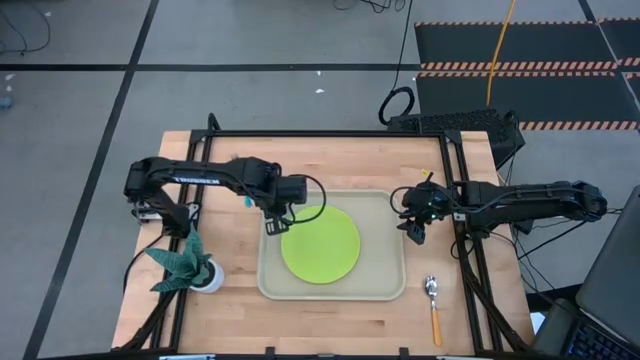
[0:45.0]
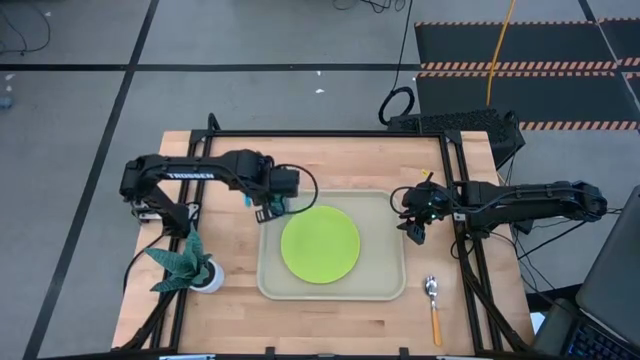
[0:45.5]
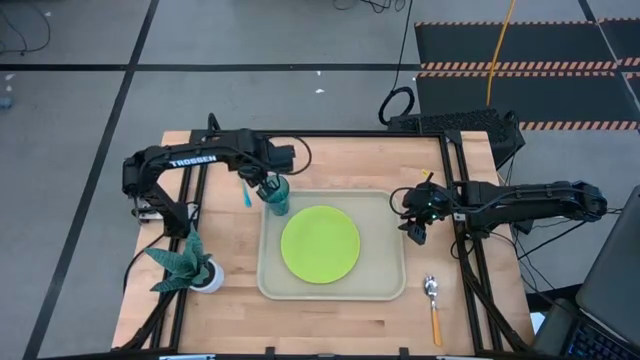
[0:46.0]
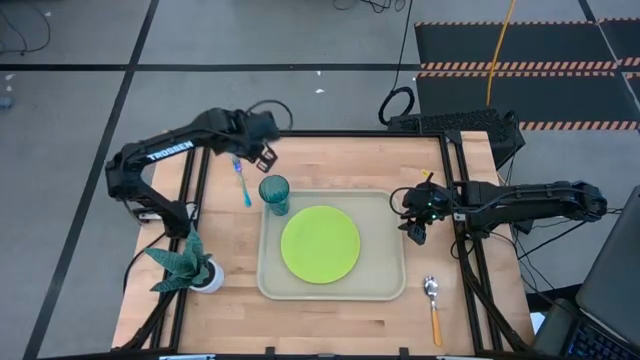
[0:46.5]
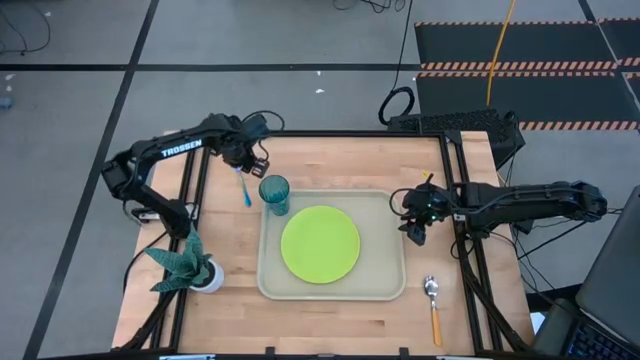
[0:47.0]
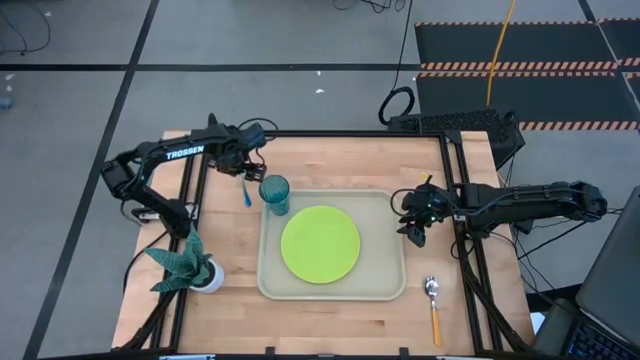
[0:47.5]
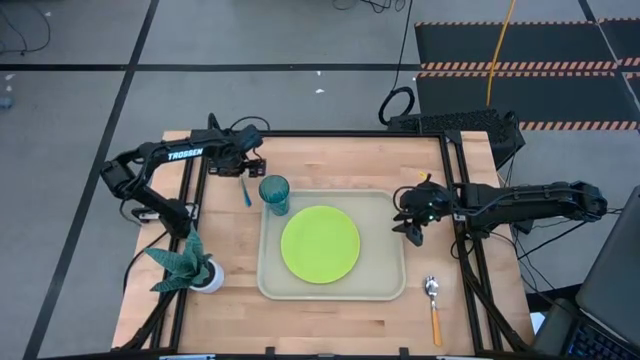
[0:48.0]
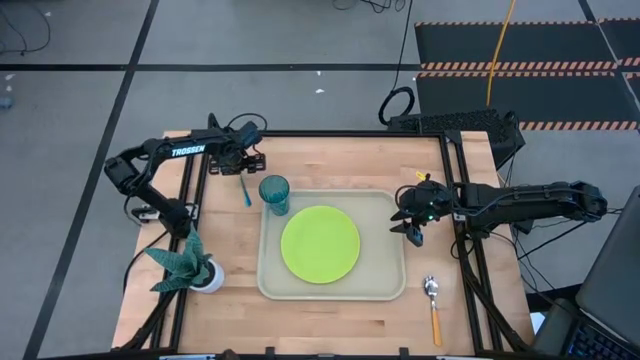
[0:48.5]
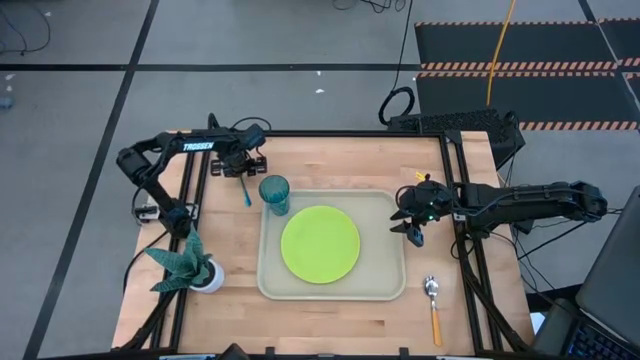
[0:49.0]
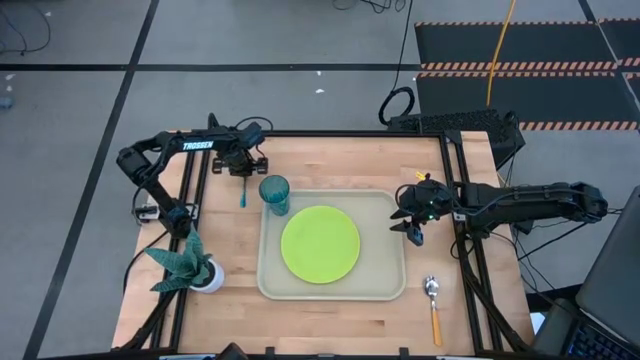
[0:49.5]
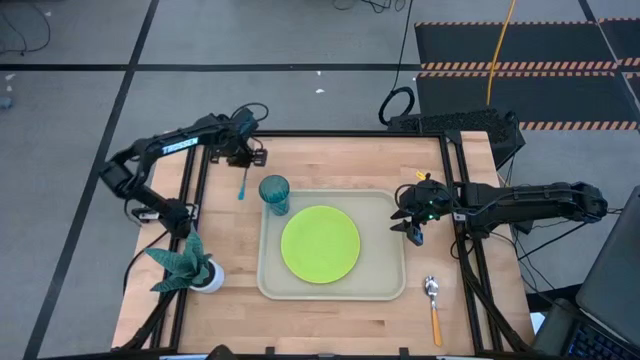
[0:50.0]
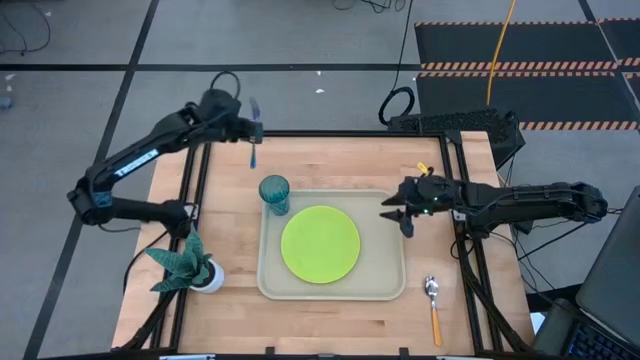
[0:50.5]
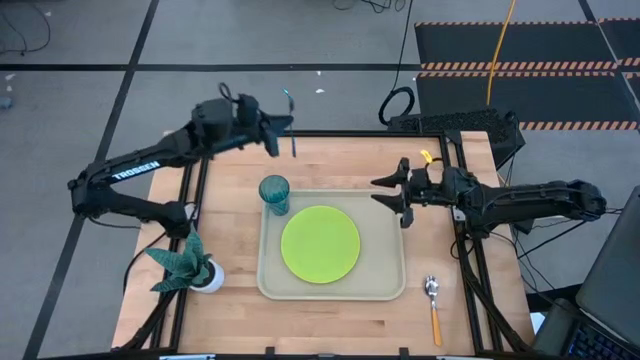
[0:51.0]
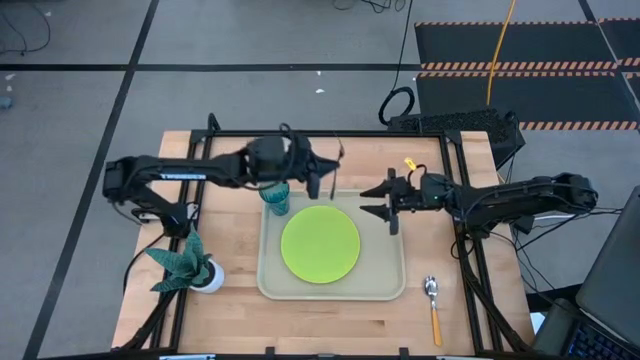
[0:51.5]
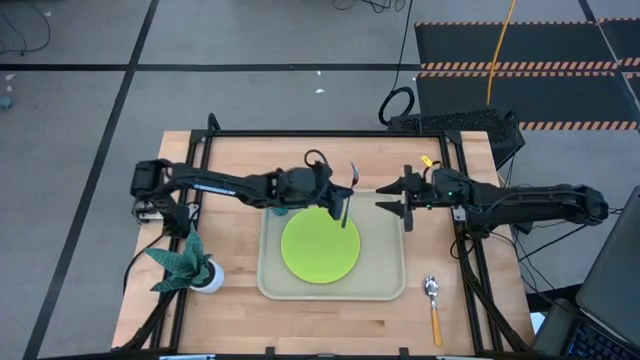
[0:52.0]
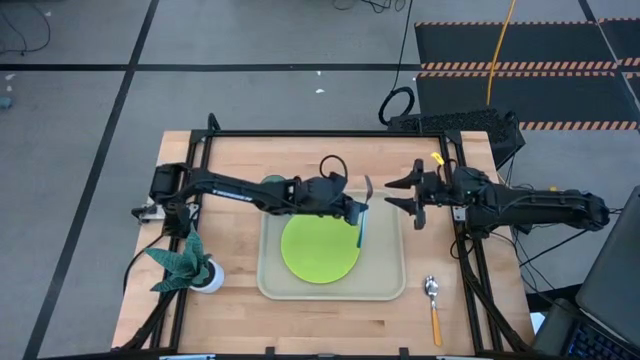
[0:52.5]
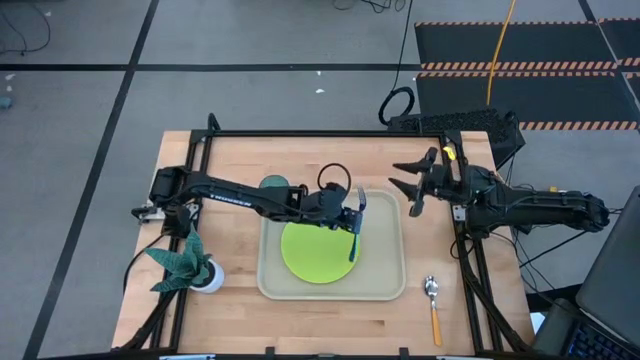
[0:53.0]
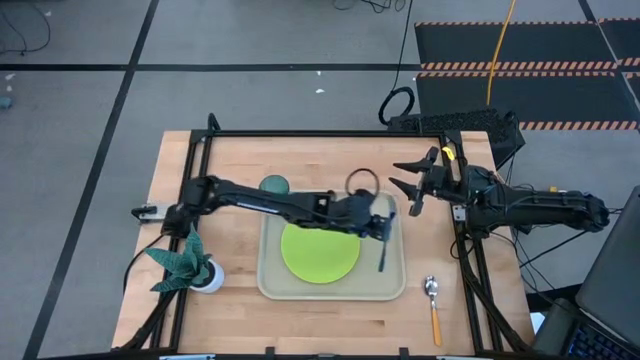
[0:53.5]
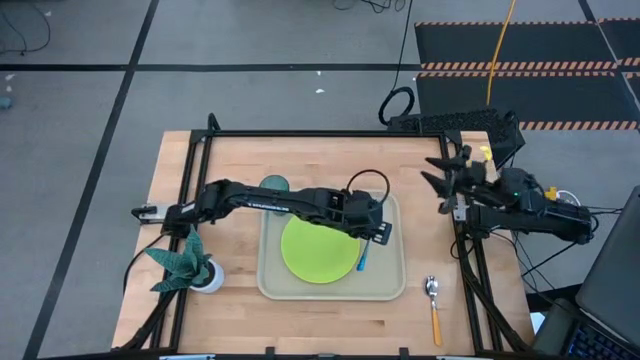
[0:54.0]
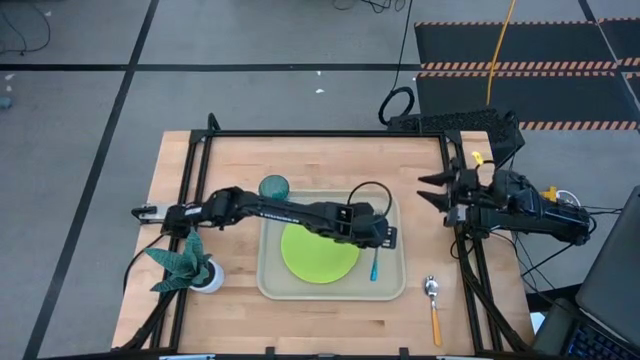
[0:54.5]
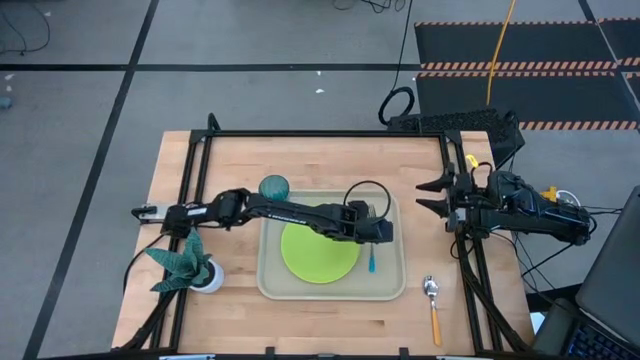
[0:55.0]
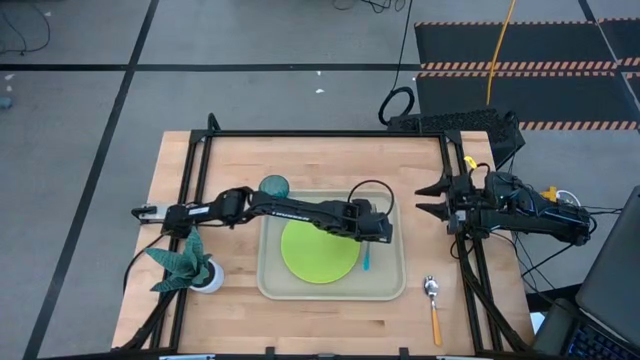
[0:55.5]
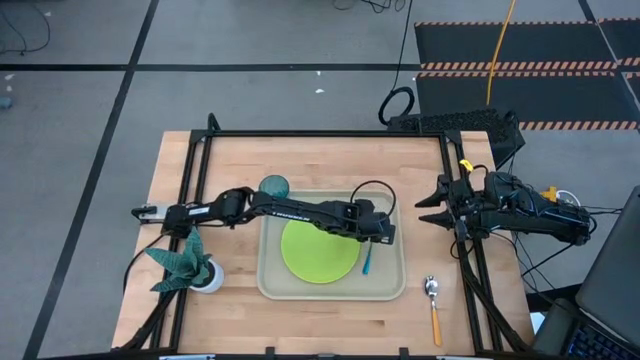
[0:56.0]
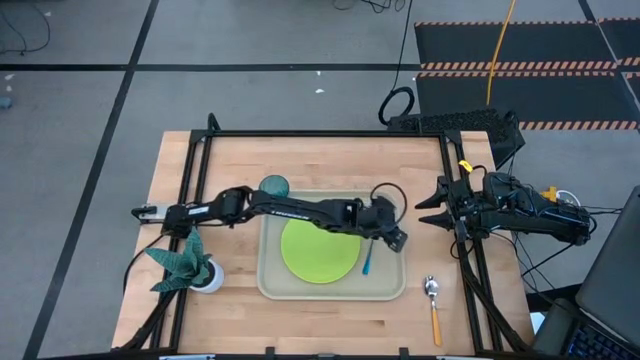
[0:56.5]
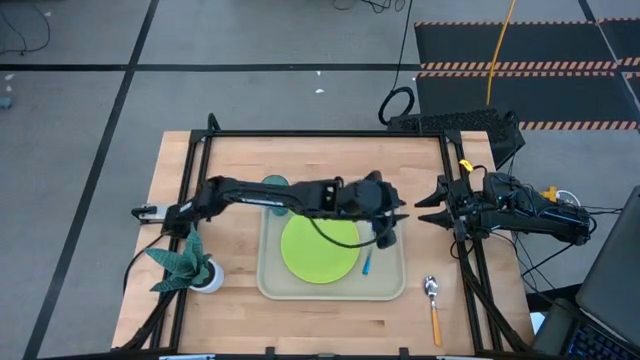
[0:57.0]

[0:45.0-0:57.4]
Task: Pick and place plate/cup/fork/spoon on tray
Put the iridescent fork on the gray serving tray

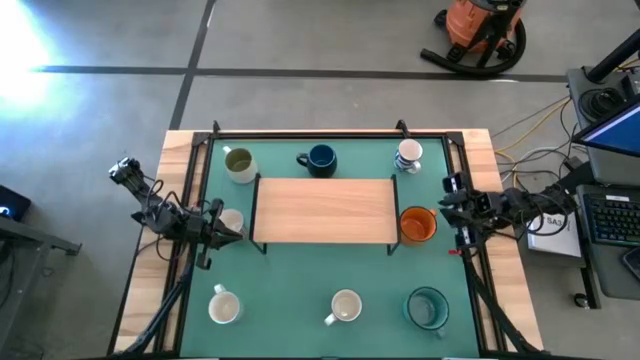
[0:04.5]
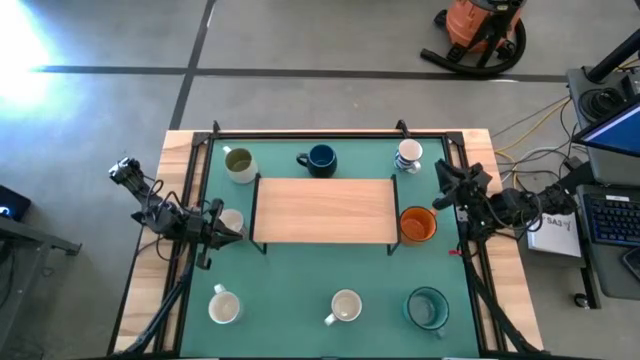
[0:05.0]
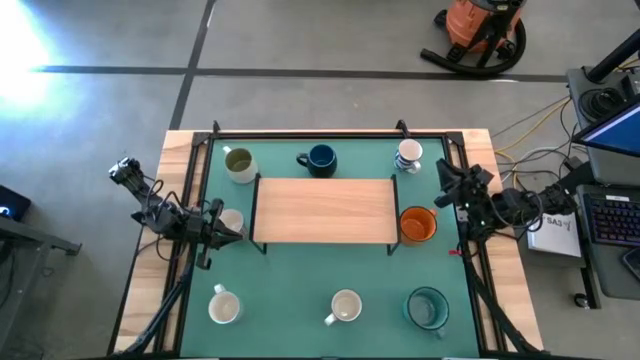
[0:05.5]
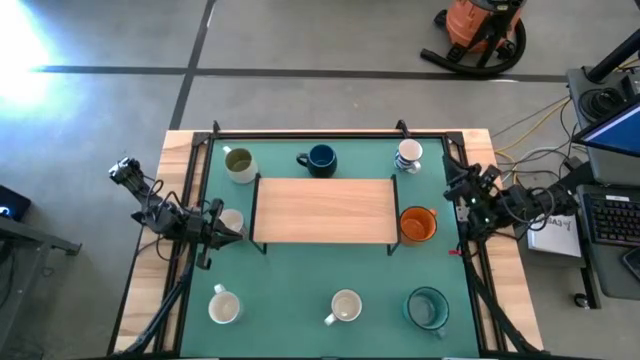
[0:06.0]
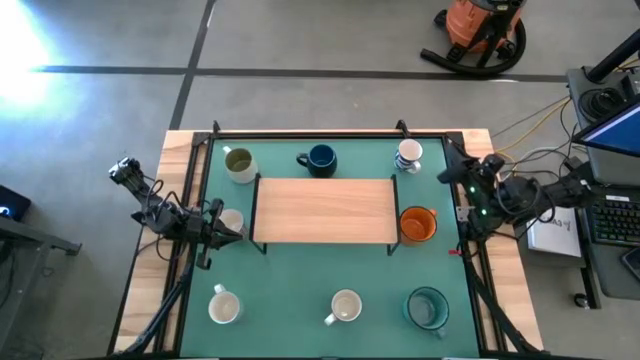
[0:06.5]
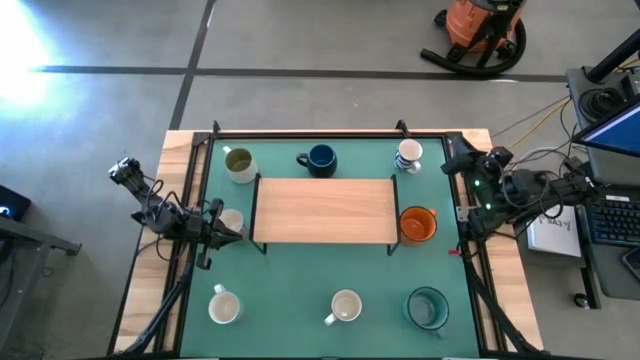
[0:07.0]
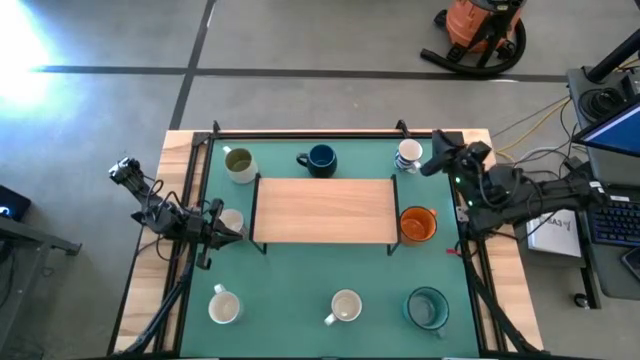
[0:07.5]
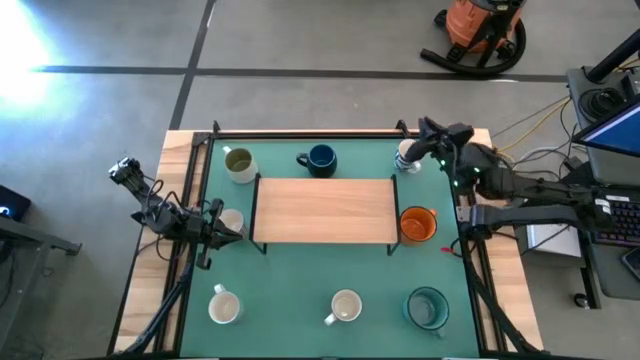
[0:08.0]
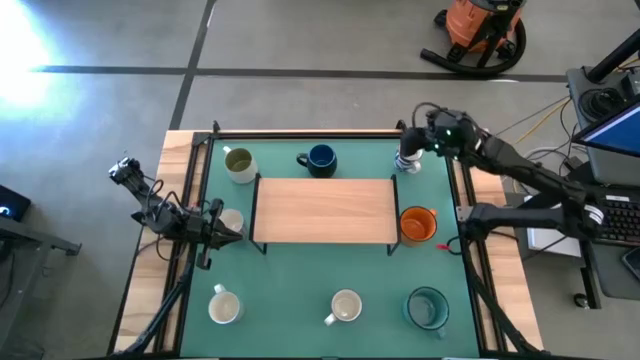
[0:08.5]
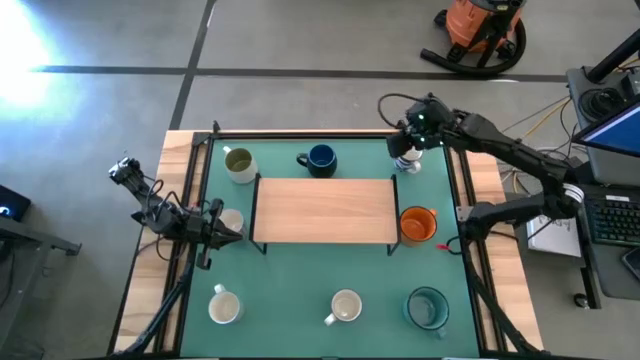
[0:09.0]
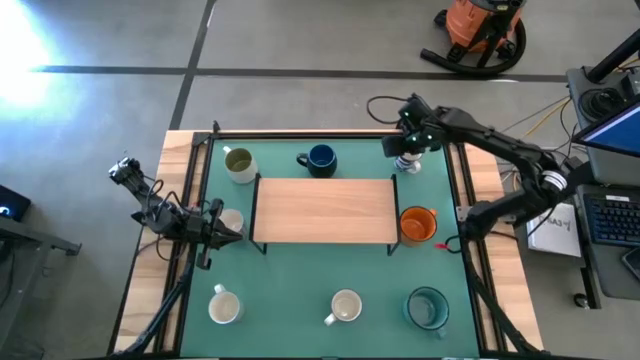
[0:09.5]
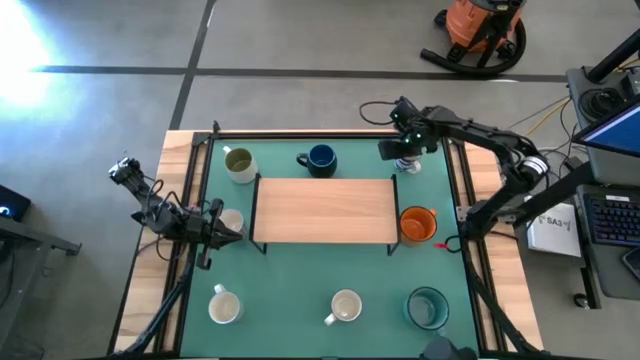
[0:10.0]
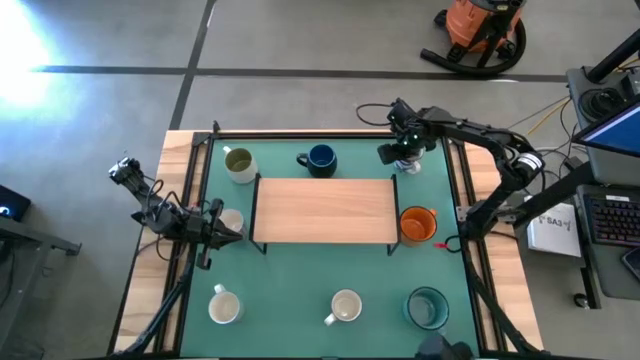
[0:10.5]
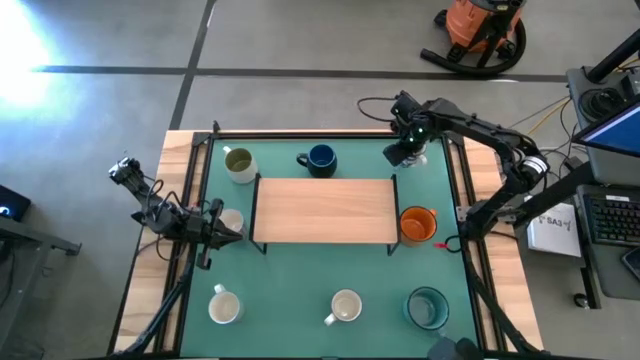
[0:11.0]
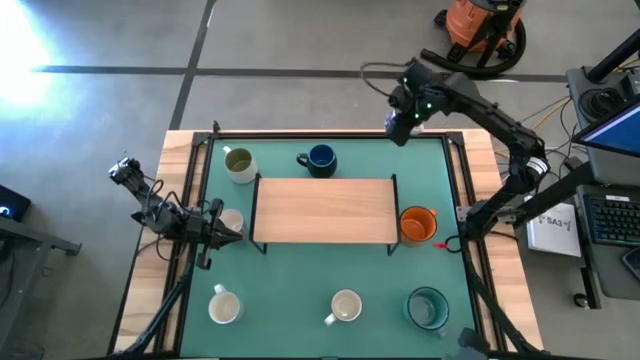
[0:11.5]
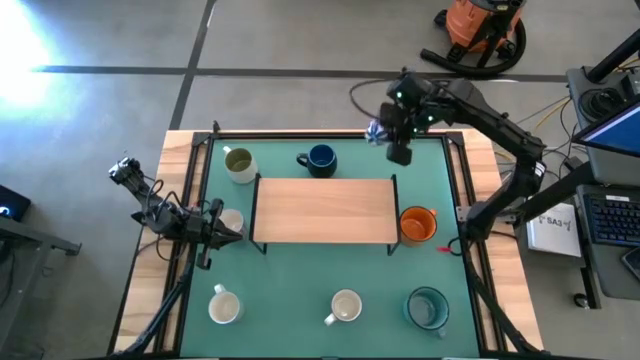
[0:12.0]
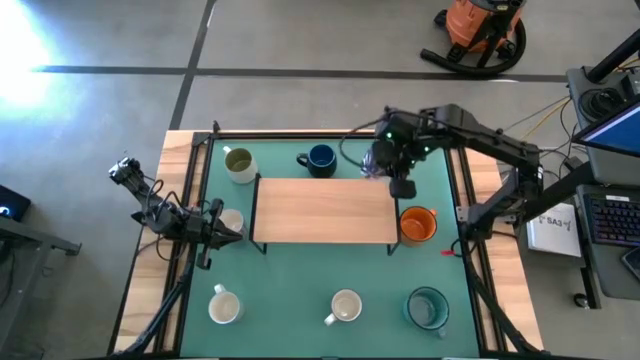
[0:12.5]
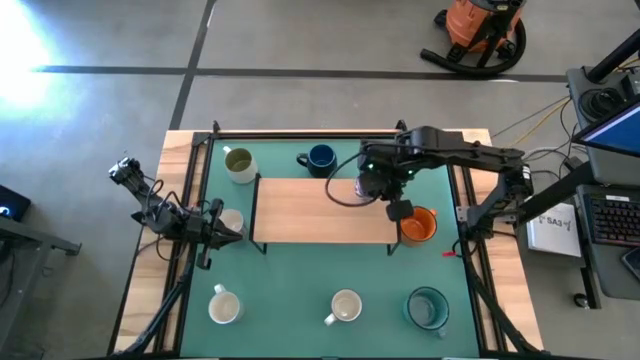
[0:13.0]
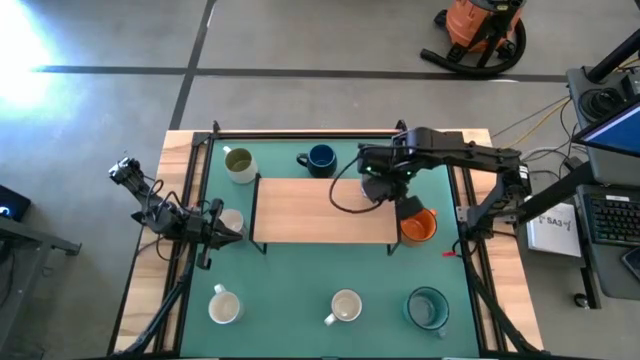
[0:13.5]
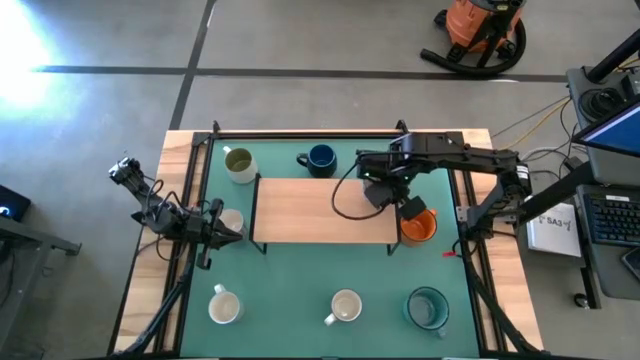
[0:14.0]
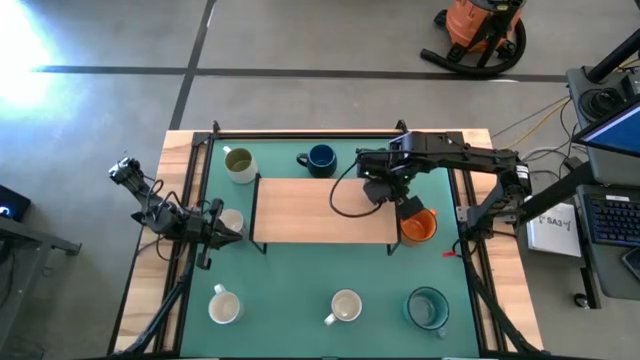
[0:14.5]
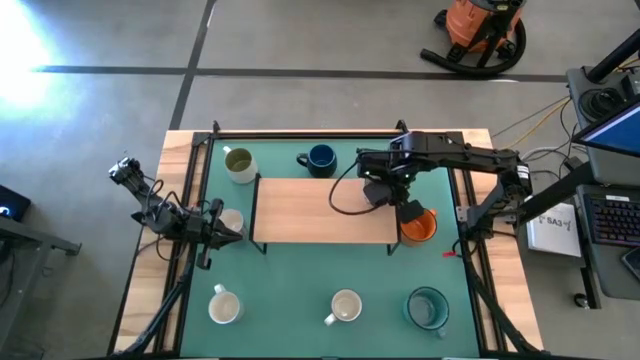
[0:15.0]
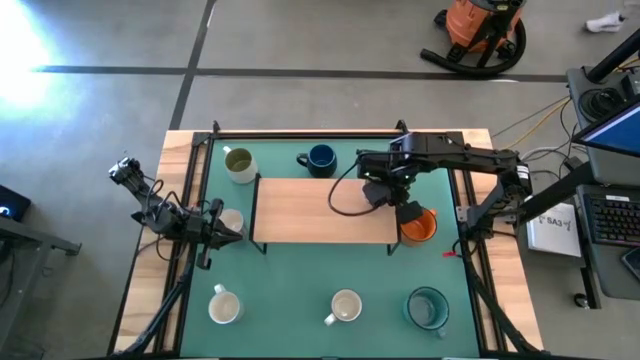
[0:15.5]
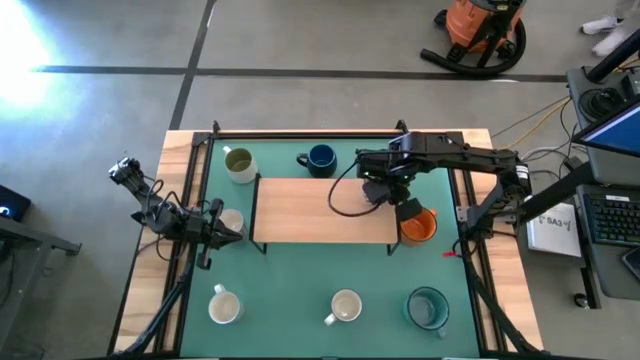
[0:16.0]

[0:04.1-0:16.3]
Task: Place coffee mugs
Put the top white blue mug on the shelf
